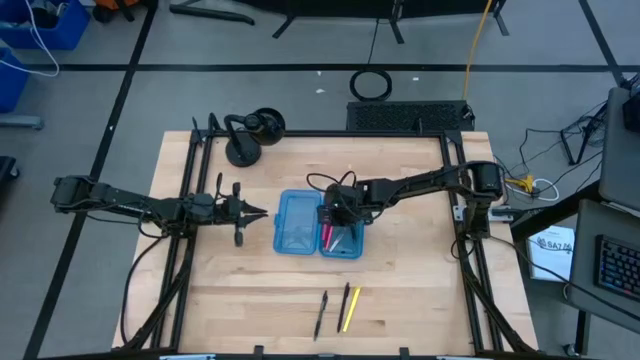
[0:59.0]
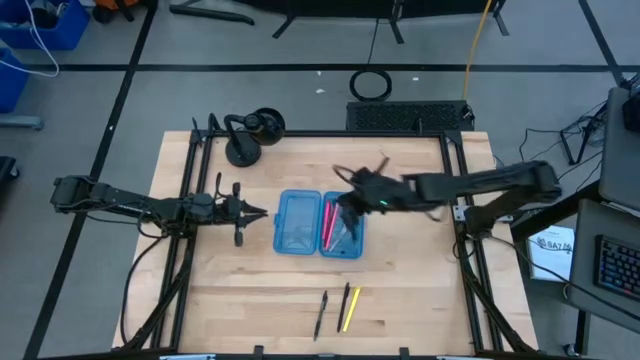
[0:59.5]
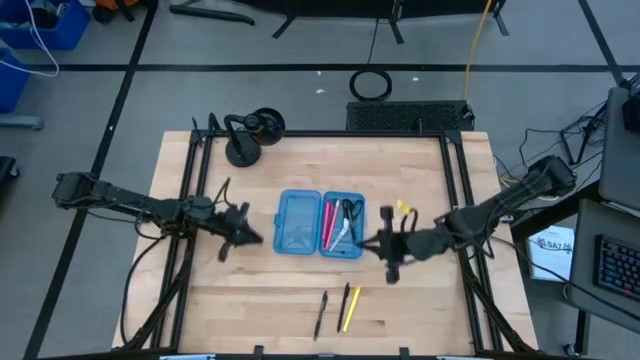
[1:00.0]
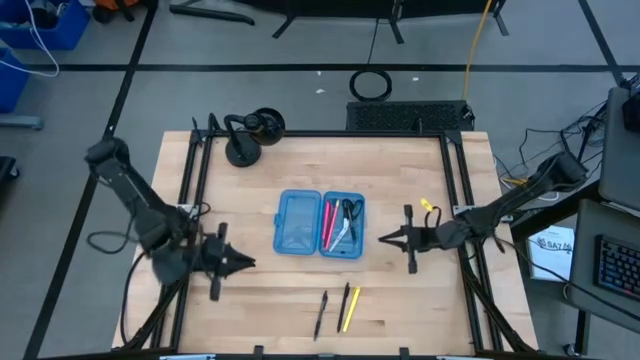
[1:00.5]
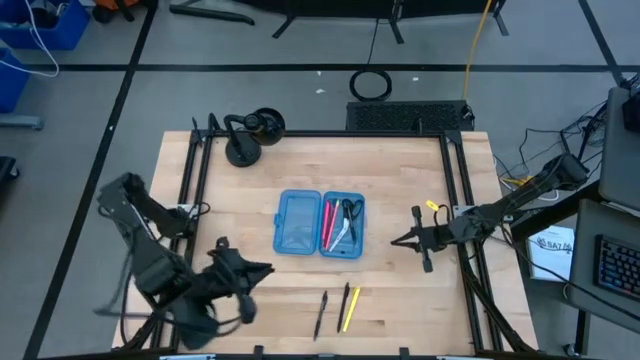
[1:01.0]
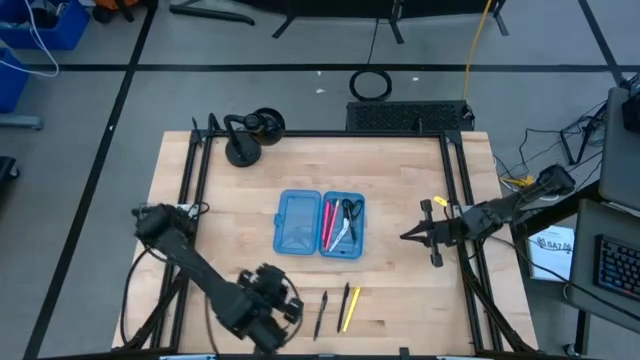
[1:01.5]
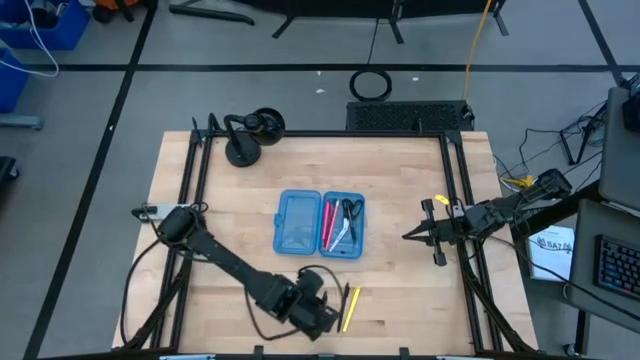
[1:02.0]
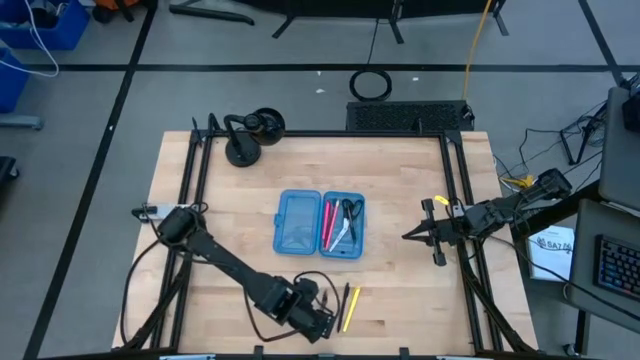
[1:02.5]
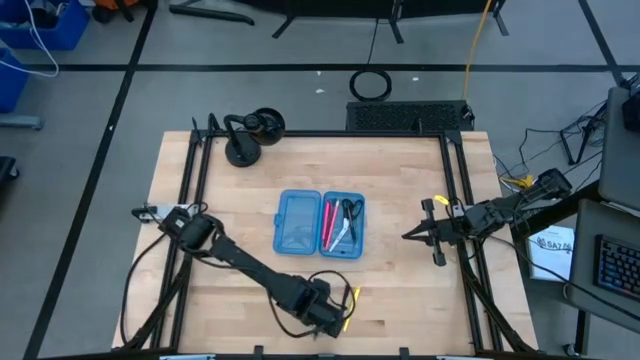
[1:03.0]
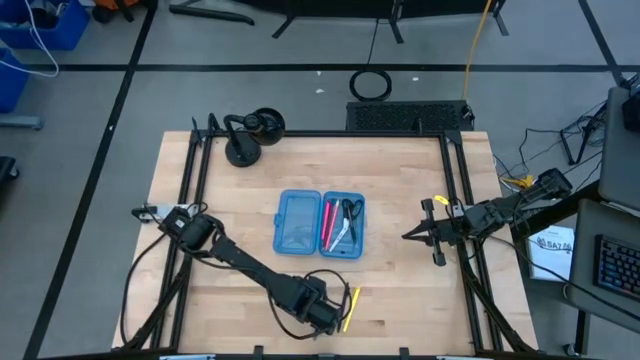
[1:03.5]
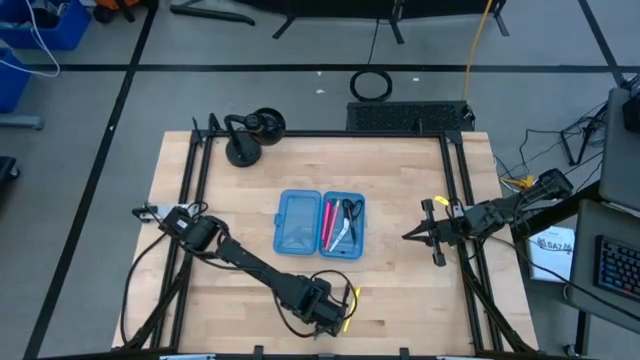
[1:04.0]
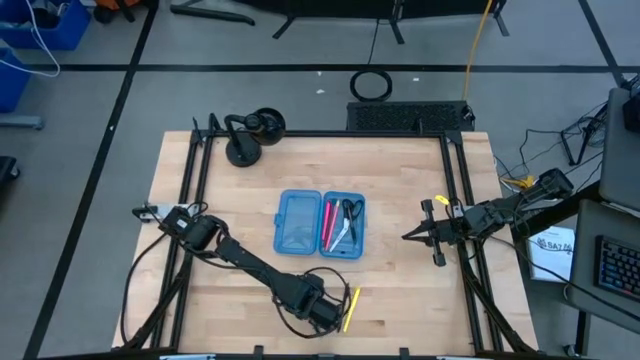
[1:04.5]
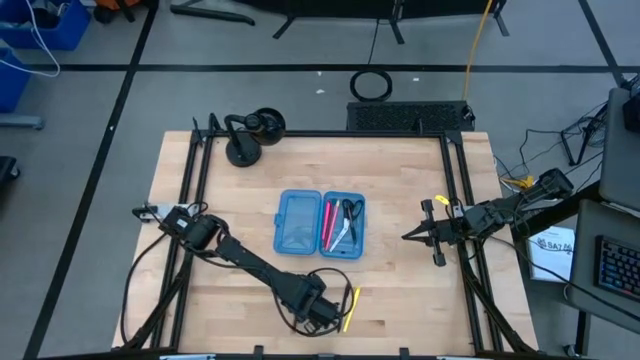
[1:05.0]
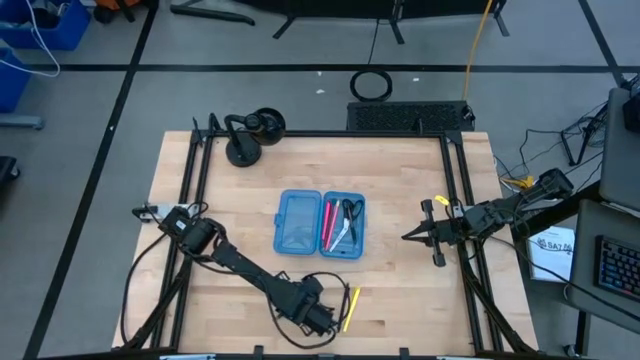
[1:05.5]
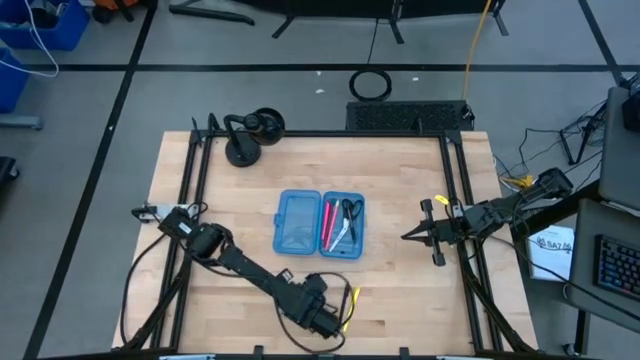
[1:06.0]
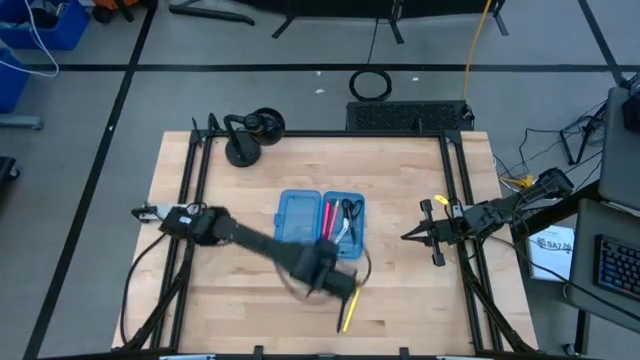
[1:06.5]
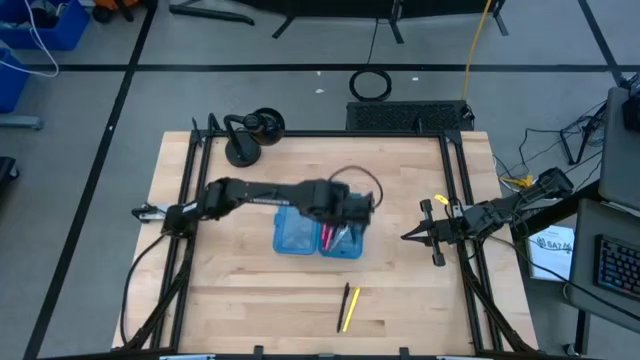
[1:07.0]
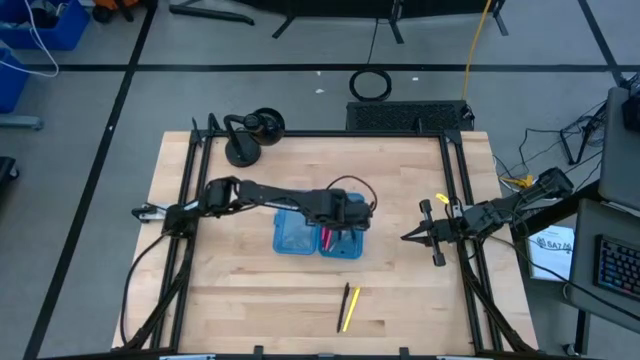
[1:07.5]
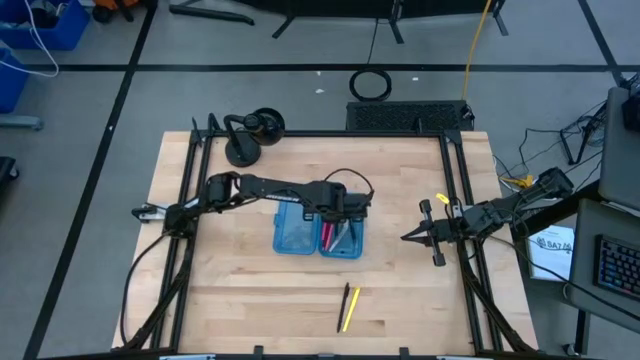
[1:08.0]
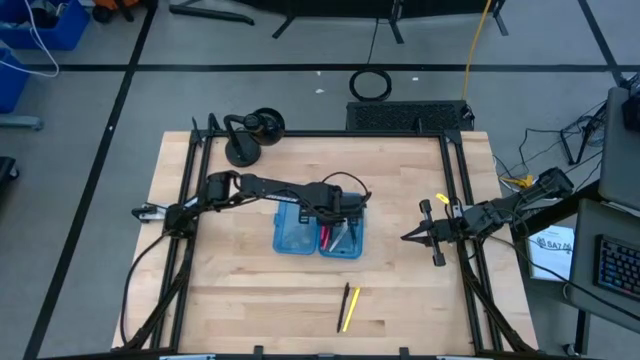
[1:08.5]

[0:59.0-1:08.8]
Task: Pick & place school supplies into a supply box
Put the left black pen into the blue supply box

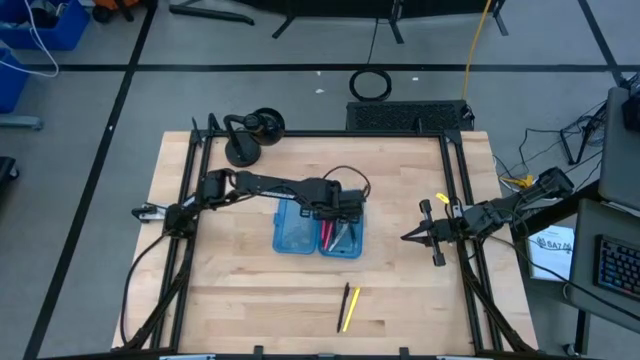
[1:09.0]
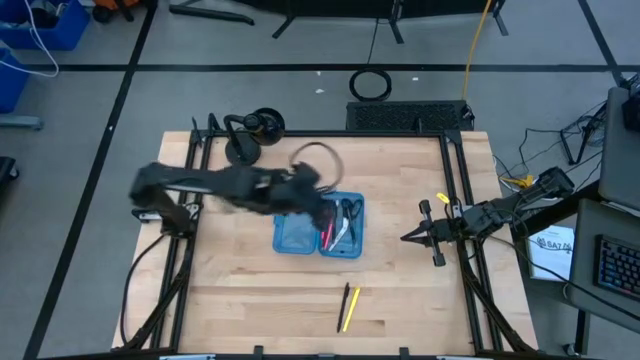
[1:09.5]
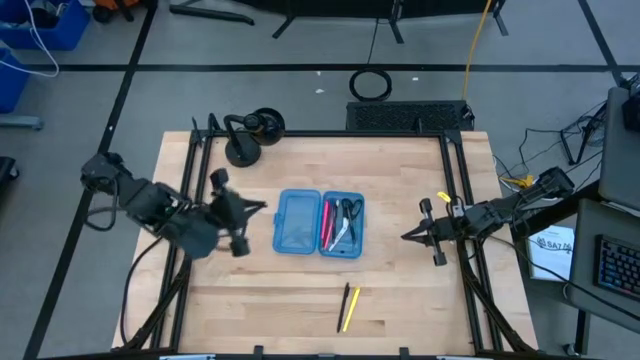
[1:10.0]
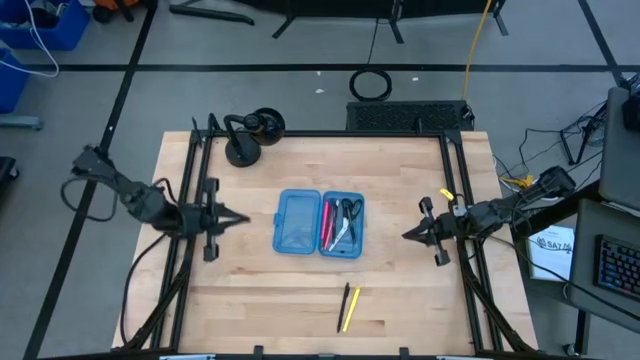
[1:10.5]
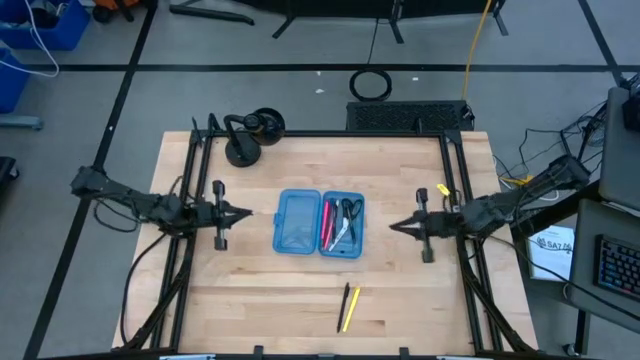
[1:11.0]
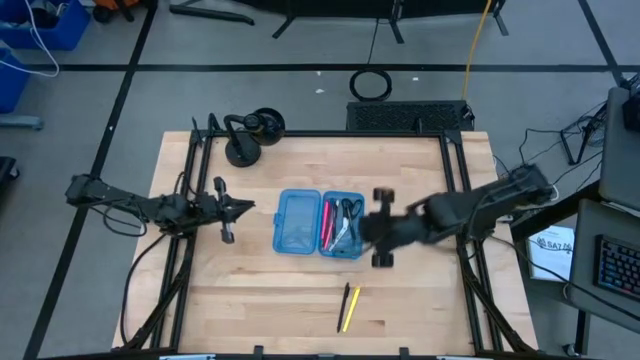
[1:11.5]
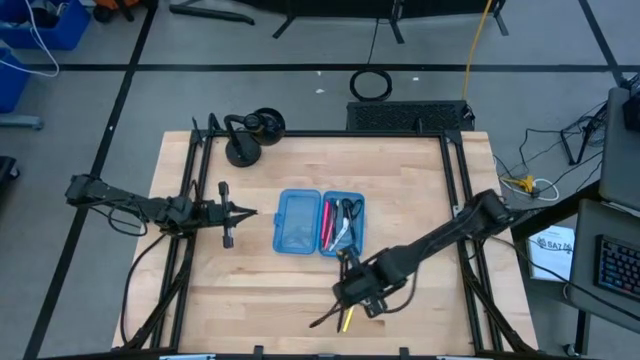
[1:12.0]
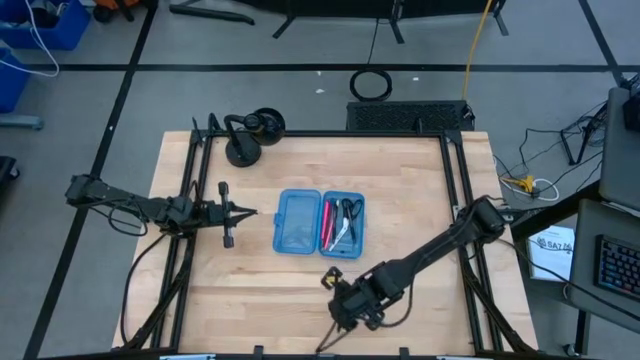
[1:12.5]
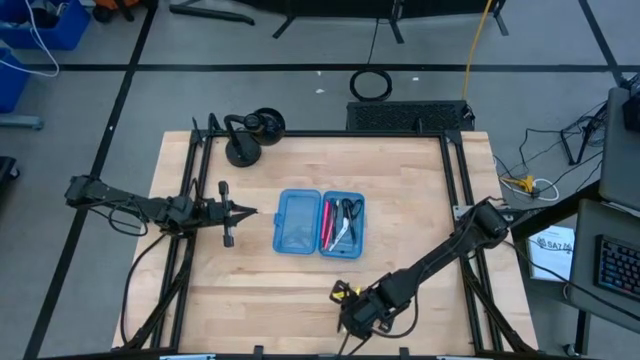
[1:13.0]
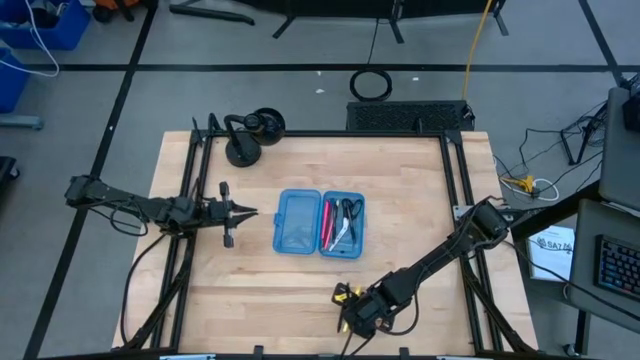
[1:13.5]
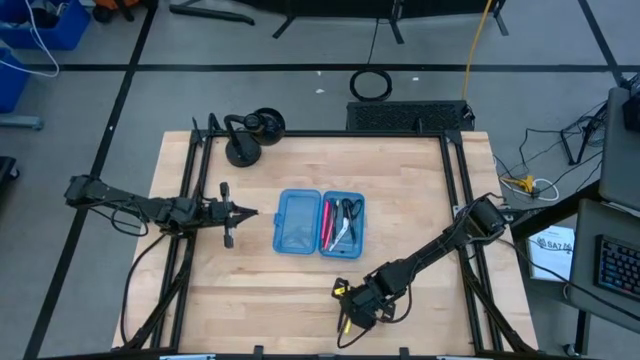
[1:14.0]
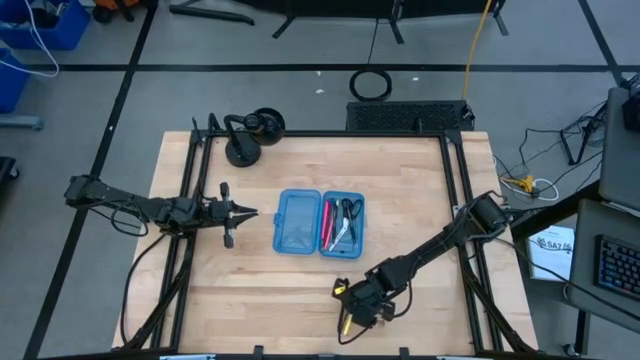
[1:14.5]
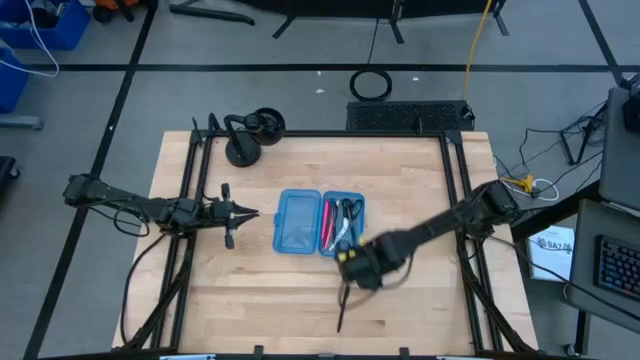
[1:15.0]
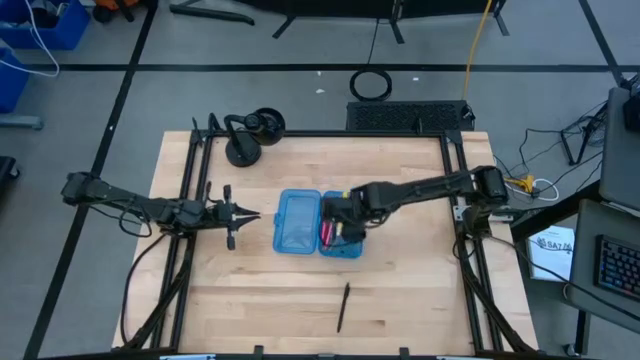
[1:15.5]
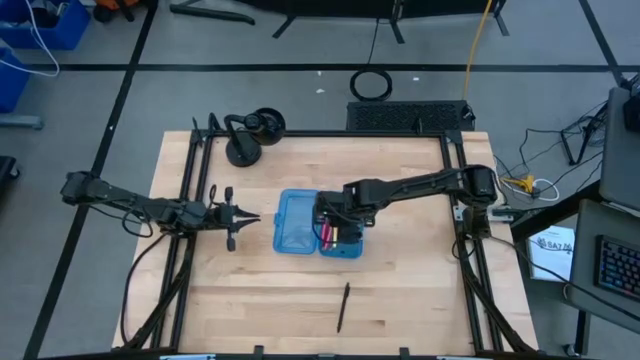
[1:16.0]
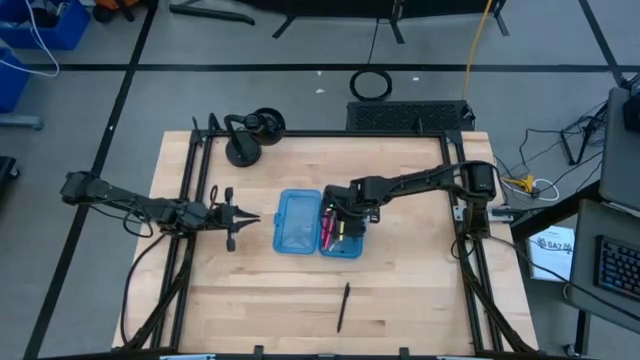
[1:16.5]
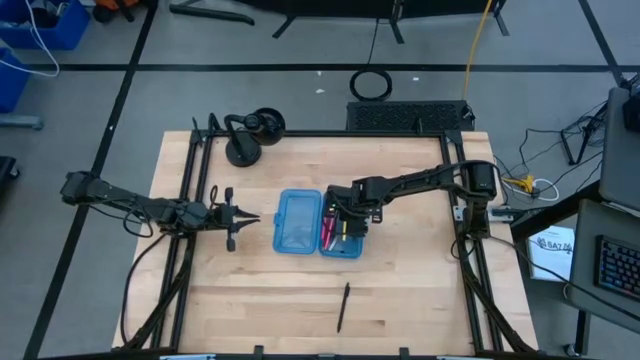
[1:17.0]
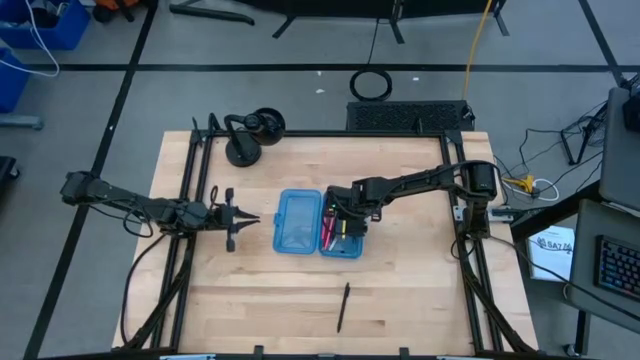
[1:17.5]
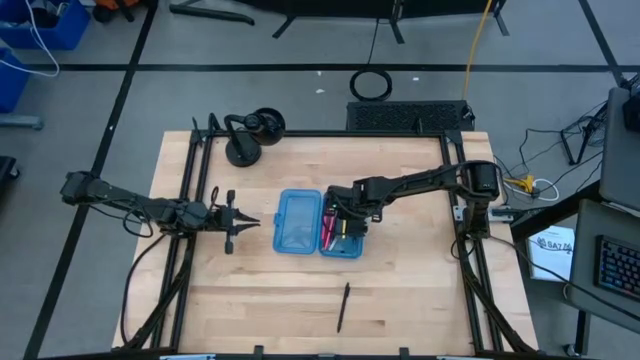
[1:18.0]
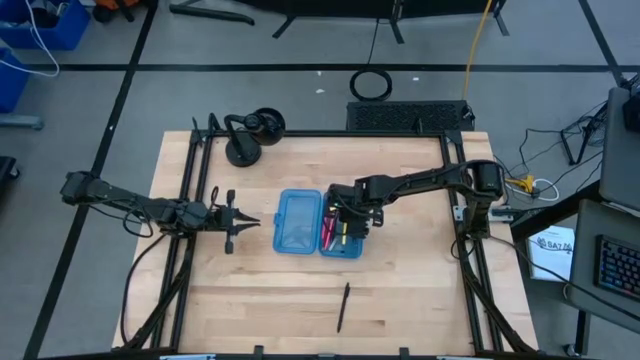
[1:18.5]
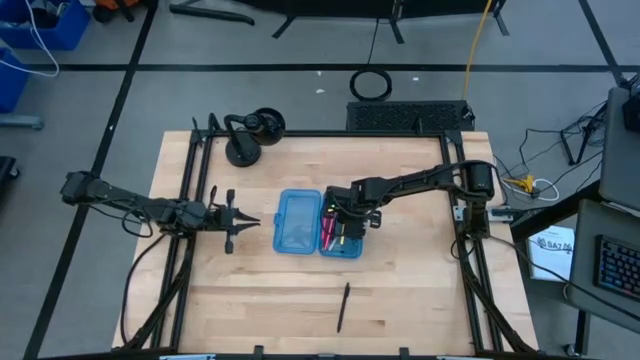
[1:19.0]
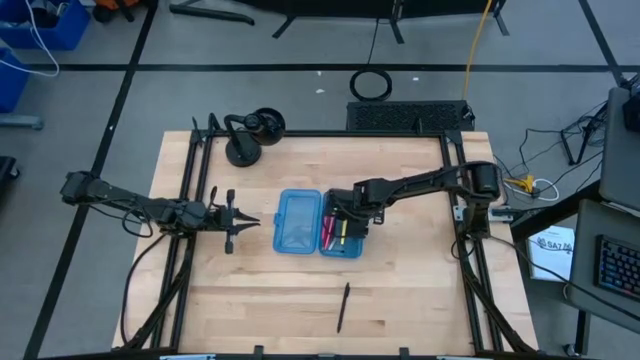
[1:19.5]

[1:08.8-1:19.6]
Put the yellow pen into the blue supply box

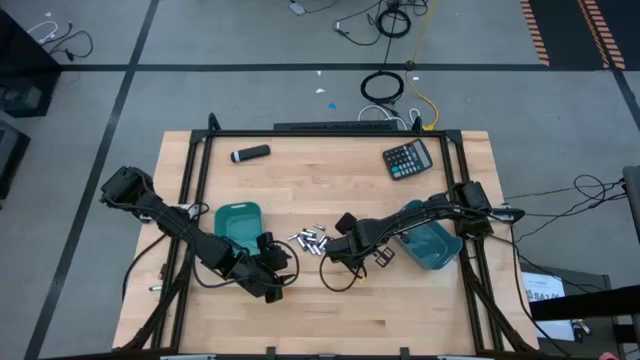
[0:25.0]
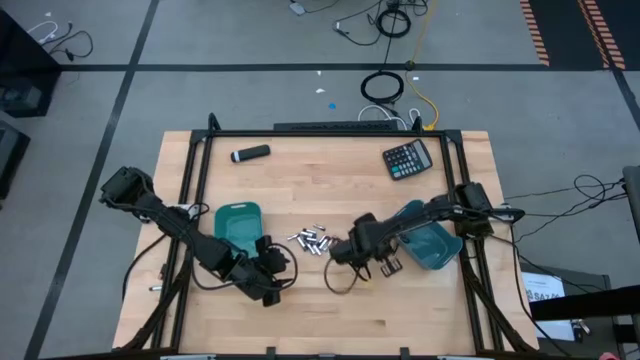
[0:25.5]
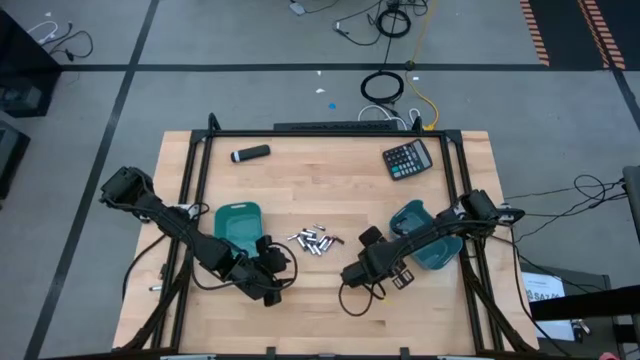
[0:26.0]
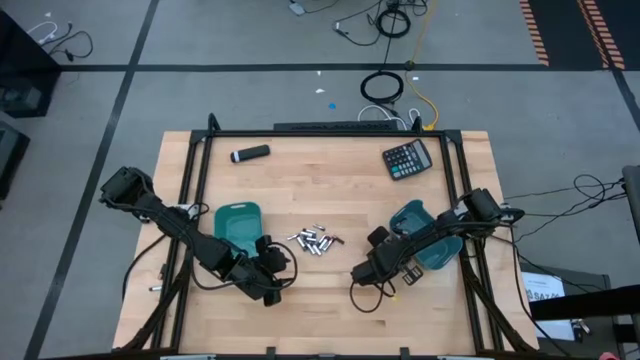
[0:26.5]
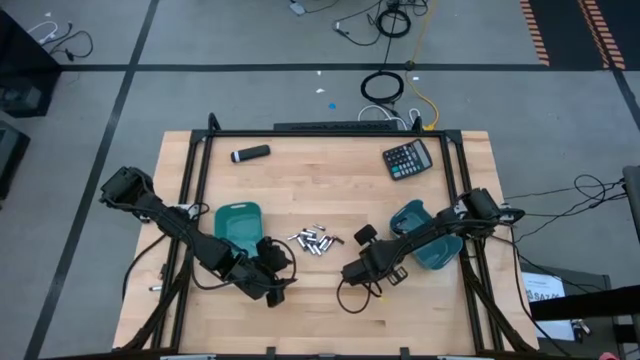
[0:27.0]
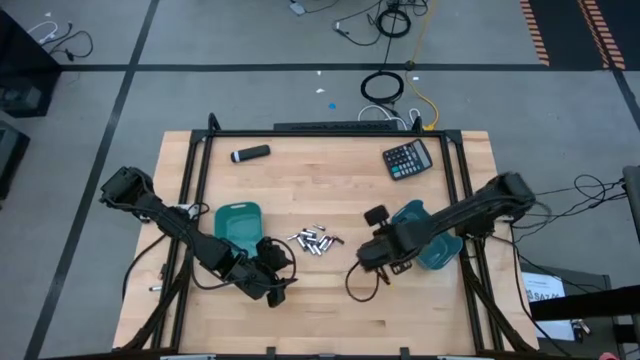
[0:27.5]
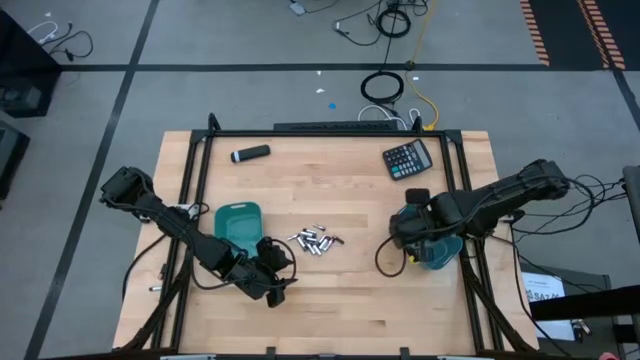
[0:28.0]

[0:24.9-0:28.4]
Task: Sort batteries
Put the black battery into the blue bin
